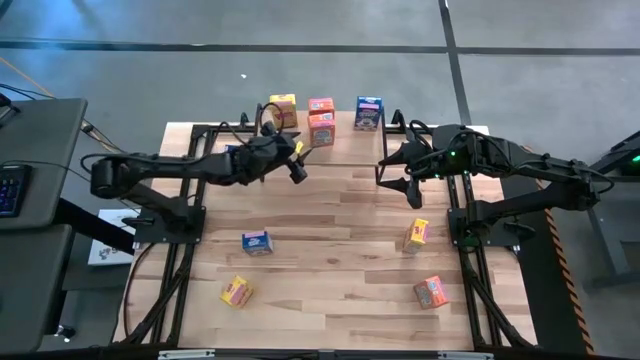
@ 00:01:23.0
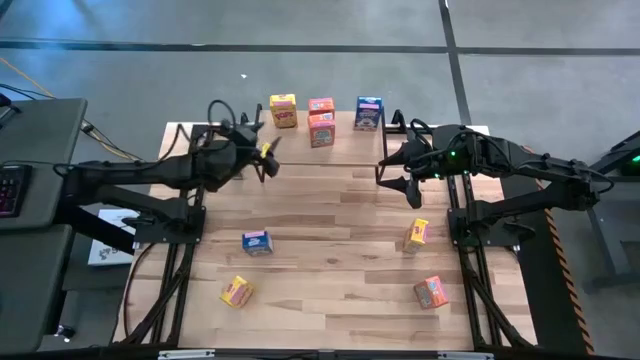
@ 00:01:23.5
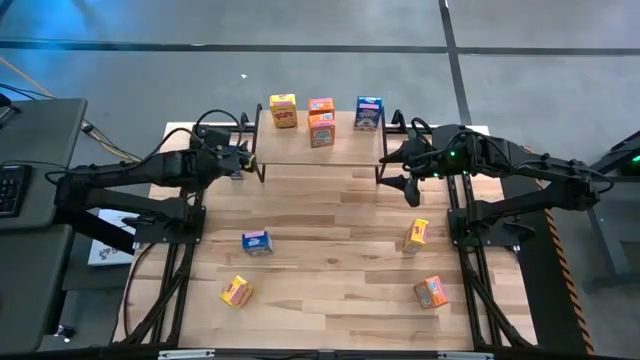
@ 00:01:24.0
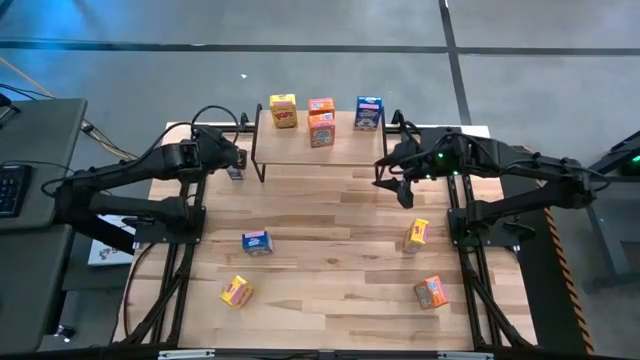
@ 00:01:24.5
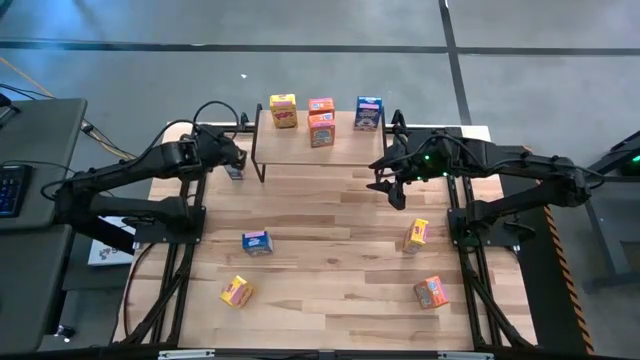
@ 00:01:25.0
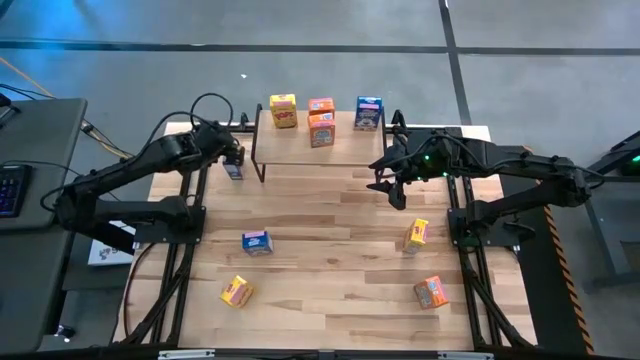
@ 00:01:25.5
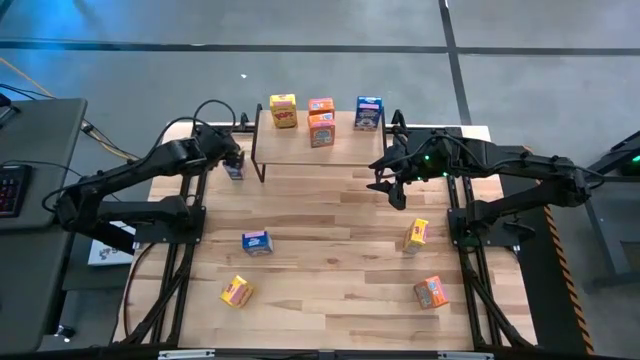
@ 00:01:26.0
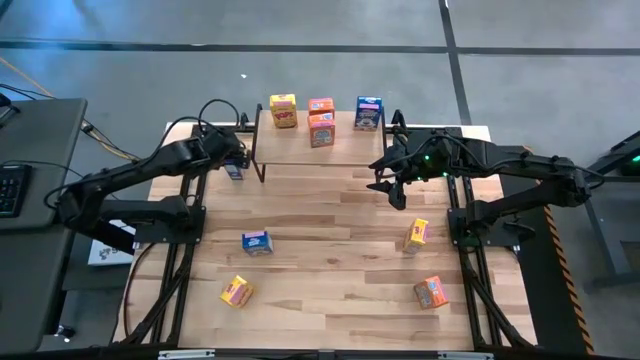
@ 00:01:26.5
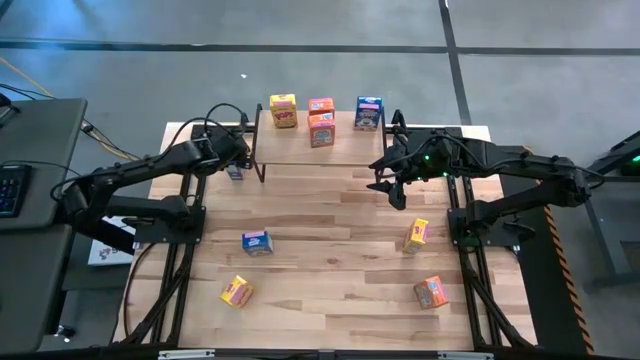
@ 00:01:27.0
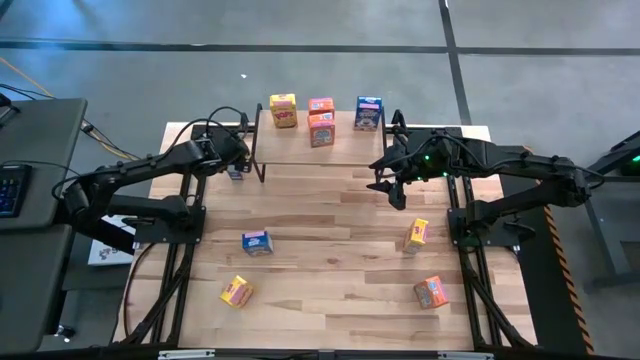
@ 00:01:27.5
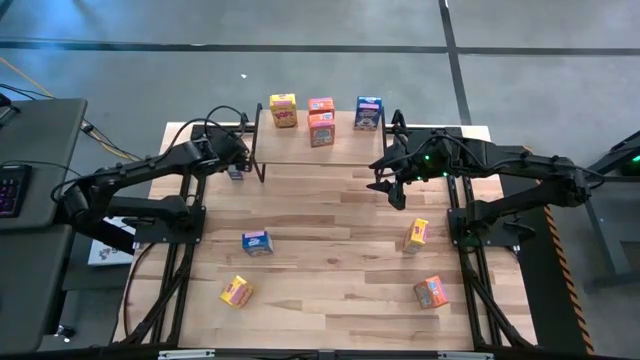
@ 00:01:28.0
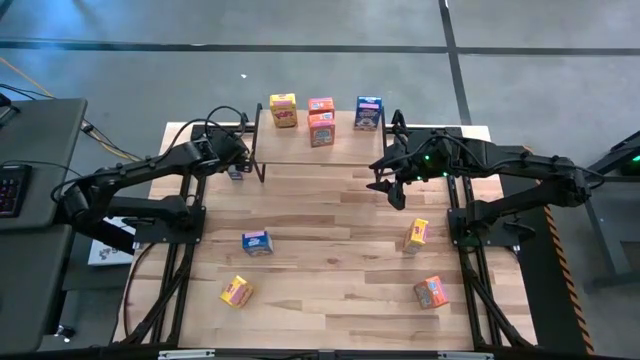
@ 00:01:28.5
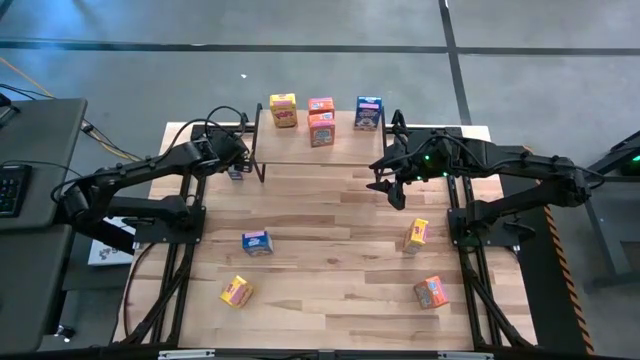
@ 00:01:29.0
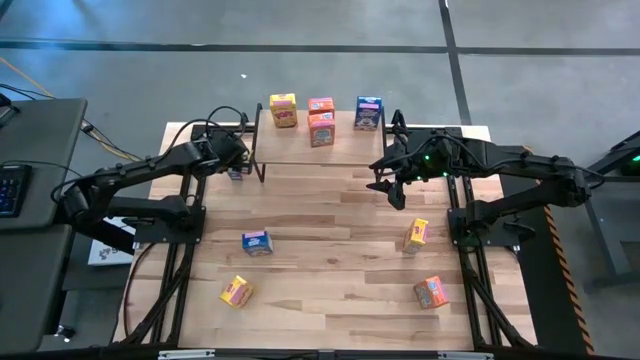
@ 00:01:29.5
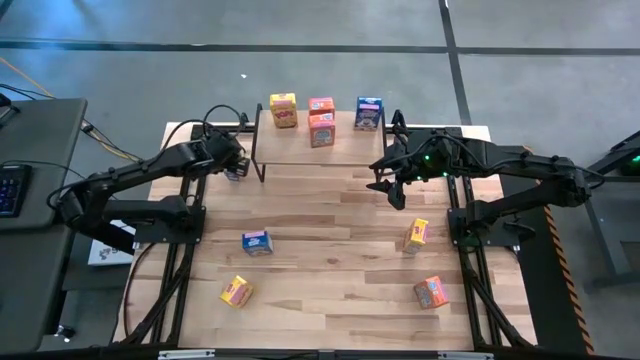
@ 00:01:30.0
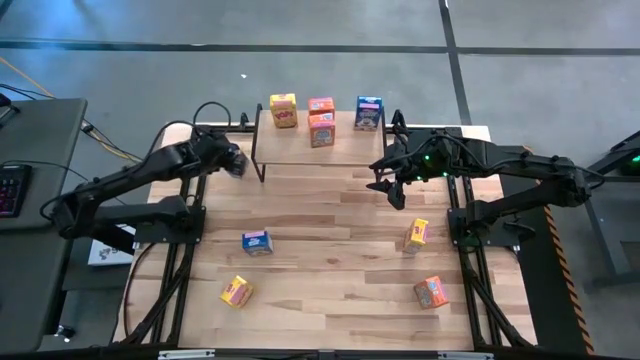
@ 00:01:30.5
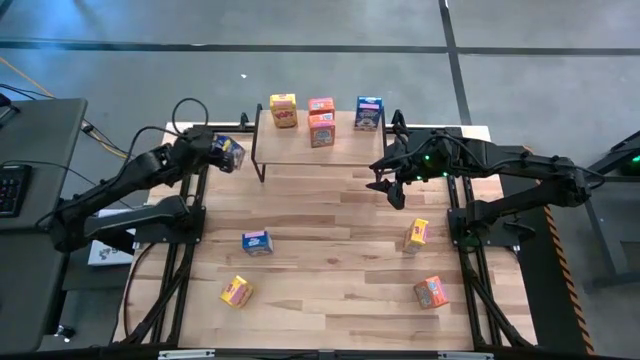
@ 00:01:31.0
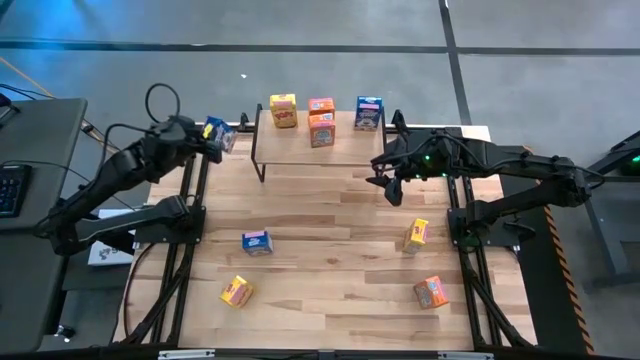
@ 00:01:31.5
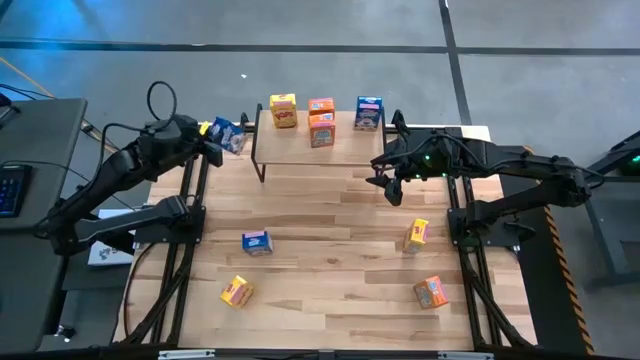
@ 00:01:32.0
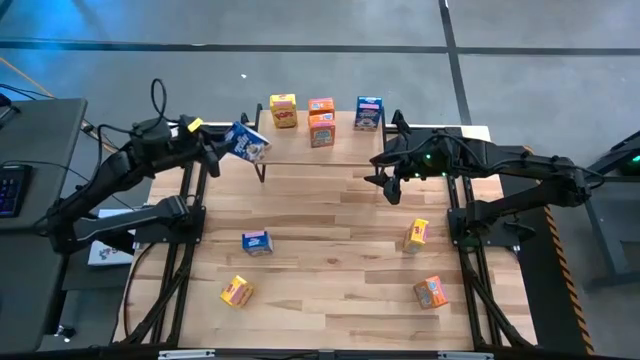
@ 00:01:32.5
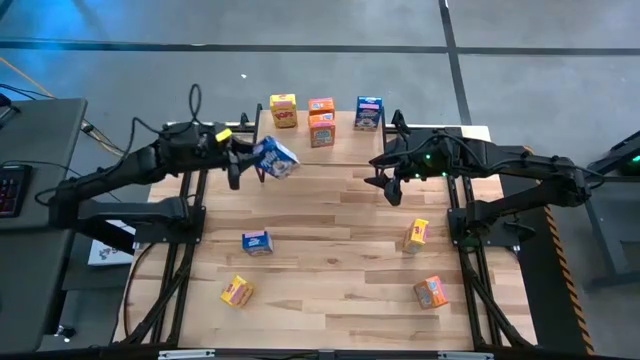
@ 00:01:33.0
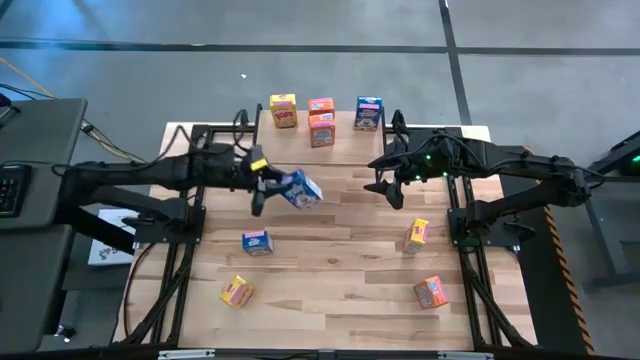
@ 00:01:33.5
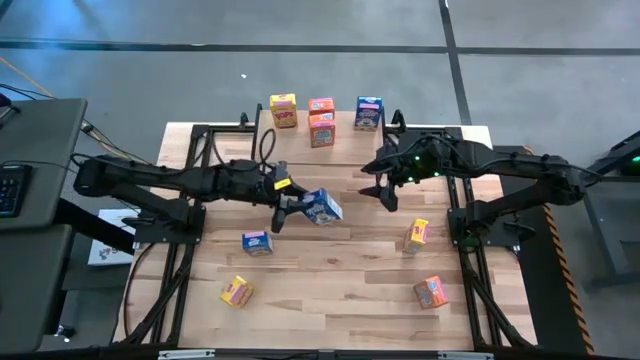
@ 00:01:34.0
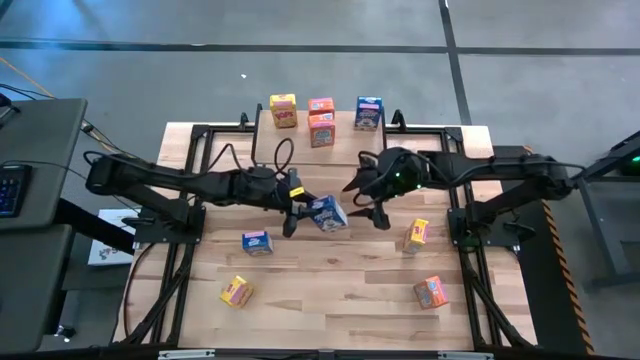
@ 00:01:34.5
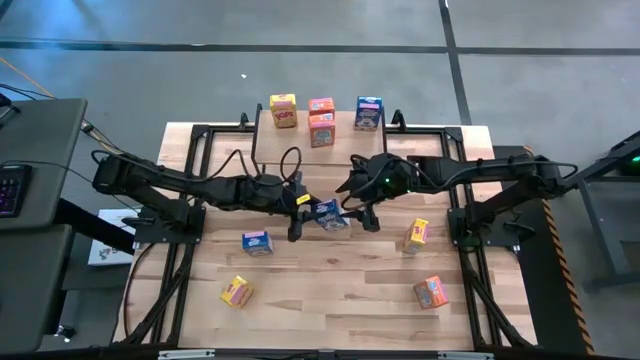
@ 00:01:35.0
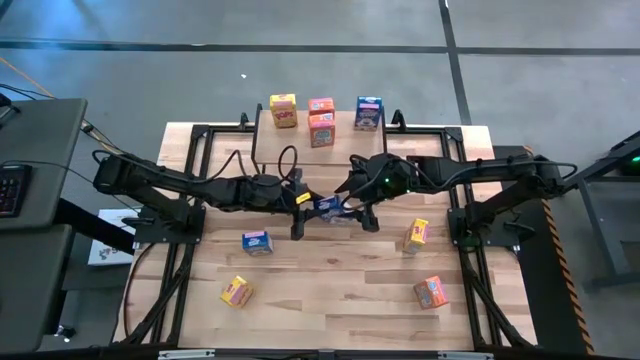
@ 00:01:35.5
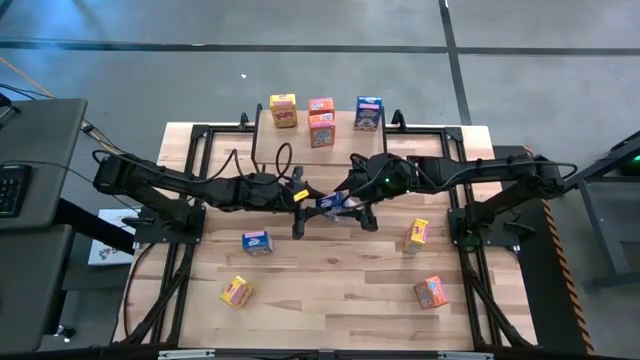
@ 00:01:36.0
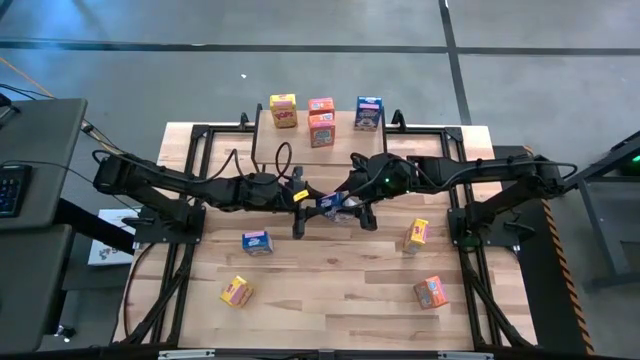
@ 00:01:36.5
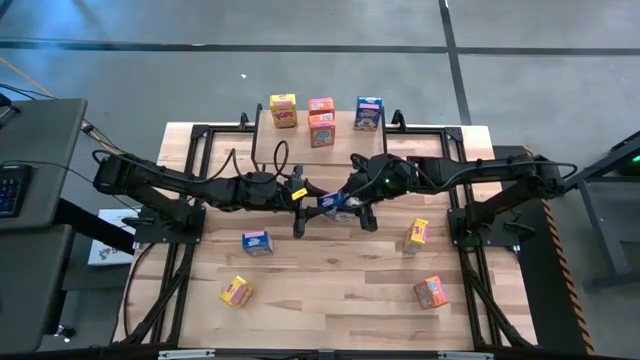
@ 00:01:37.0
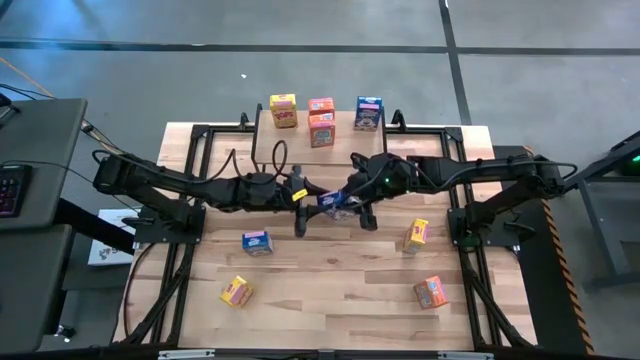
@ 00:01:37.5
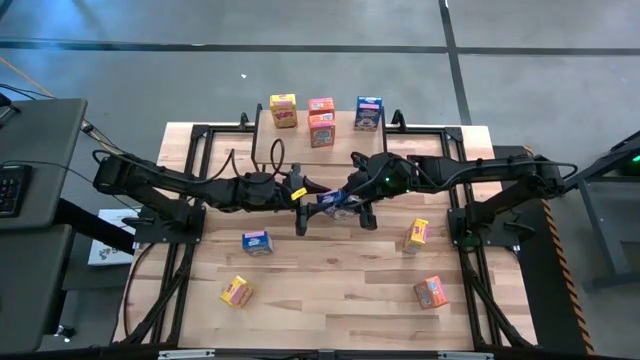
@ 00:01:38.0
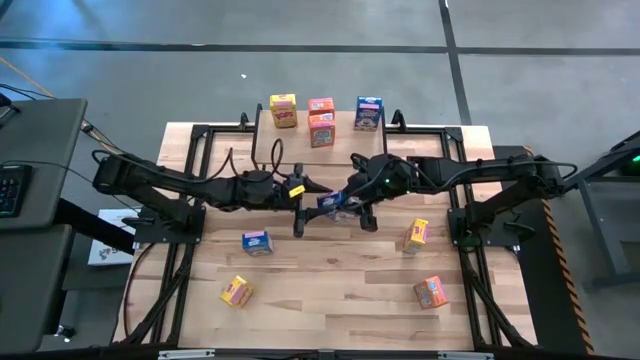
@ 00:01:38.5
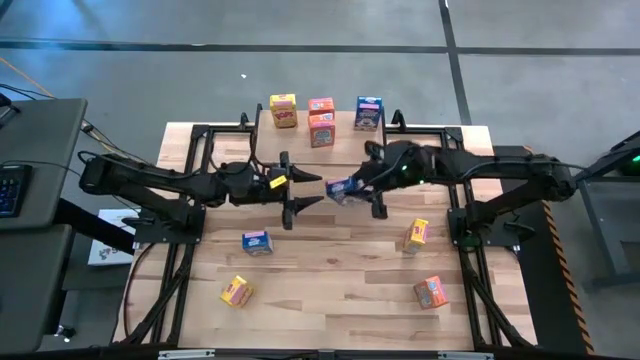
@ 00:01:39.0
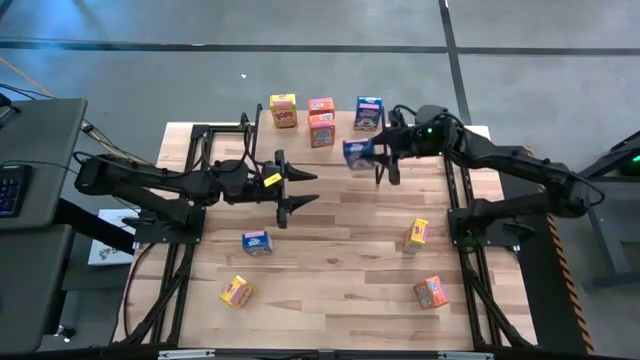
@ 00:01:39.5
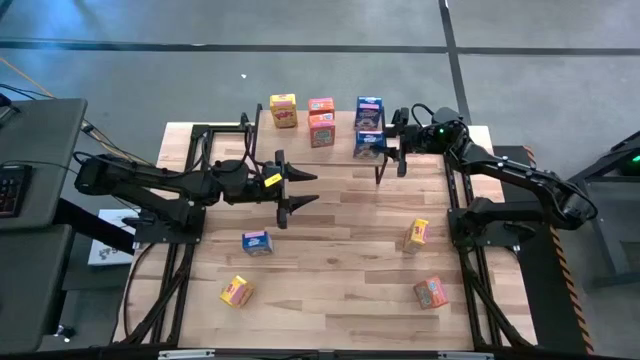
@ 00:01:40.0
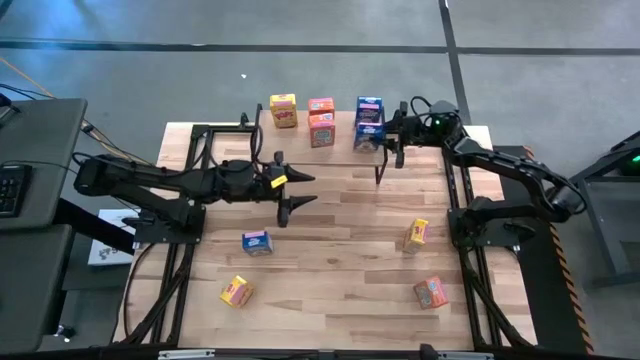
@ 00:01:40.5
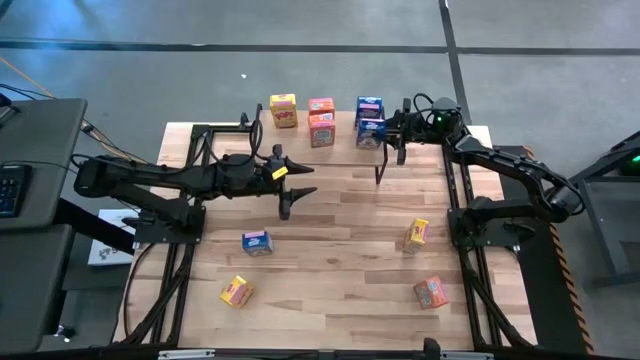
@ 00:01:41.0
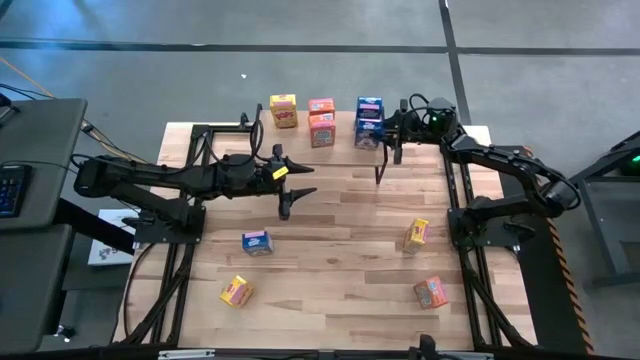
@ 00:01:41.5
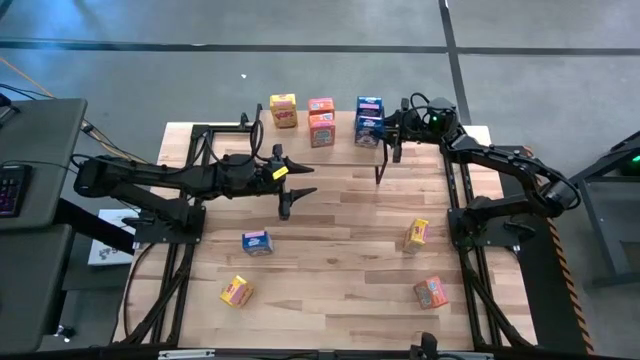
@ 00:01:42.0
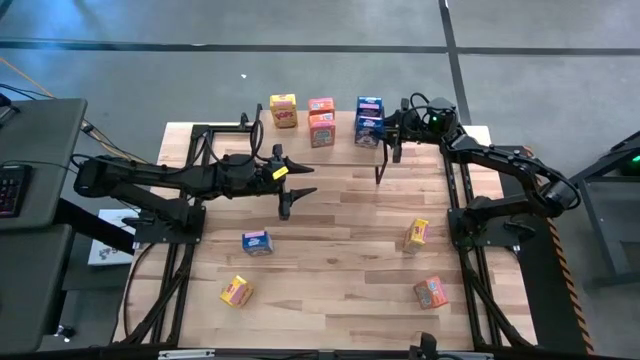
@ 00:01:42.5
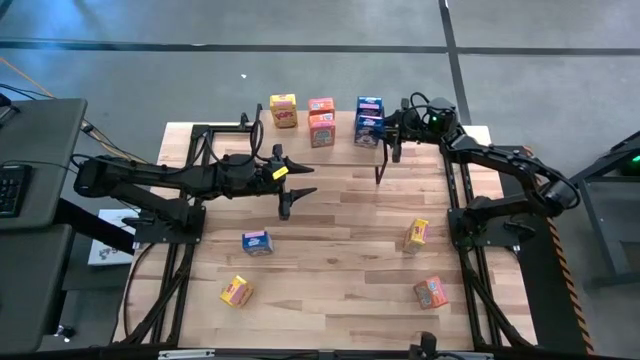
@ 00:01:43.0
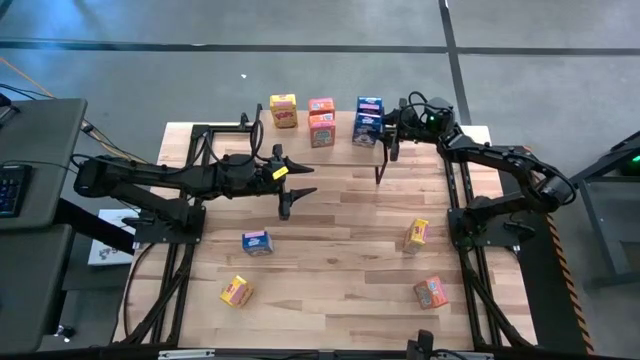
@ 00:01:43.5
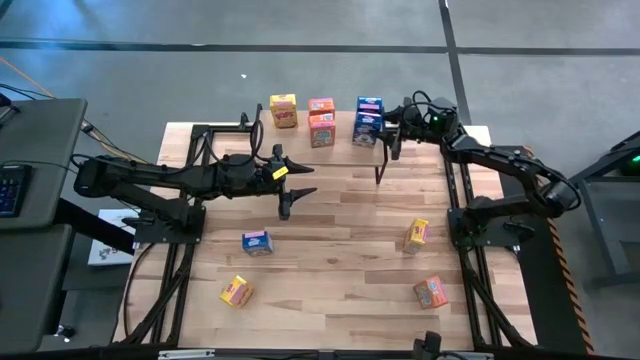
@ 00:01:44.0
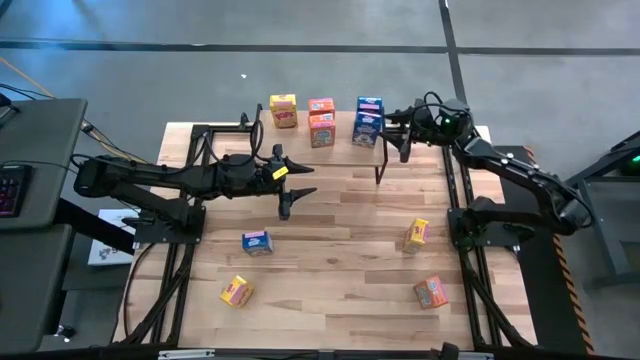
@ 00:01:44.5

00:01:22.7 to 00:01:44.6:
Task: Stack cereal on shelf
Put the top blue cereal box on the shelf aligned with the other blue cereal box
